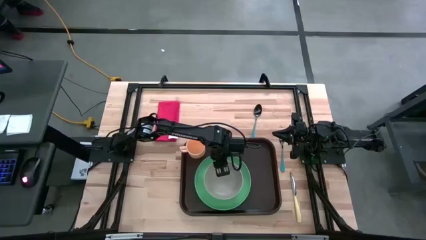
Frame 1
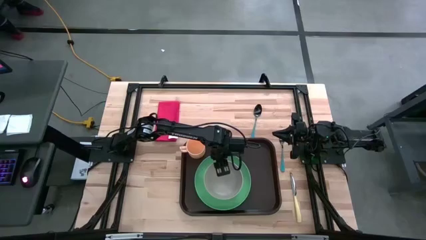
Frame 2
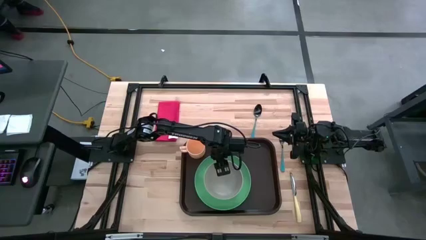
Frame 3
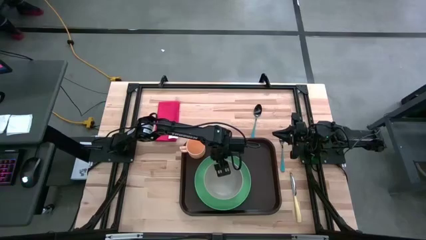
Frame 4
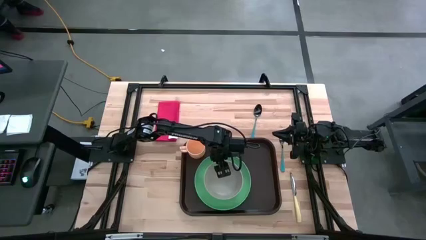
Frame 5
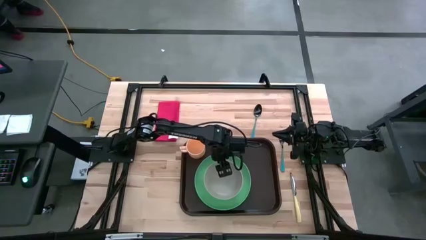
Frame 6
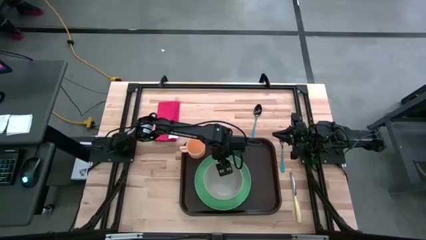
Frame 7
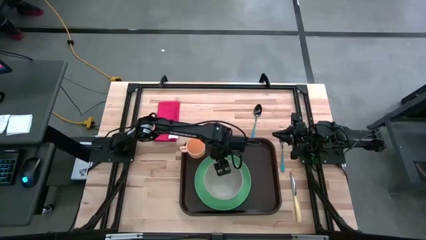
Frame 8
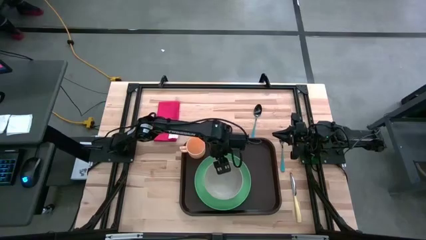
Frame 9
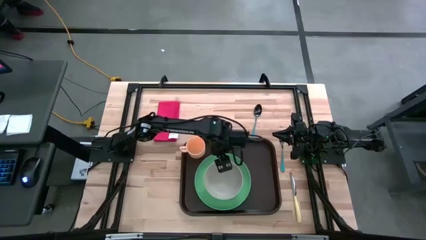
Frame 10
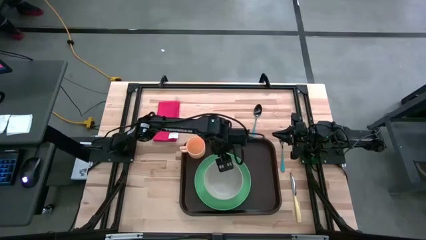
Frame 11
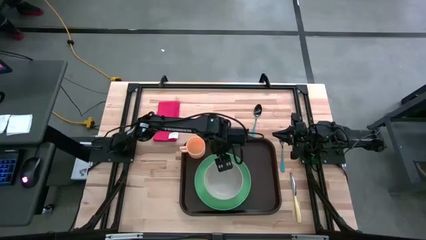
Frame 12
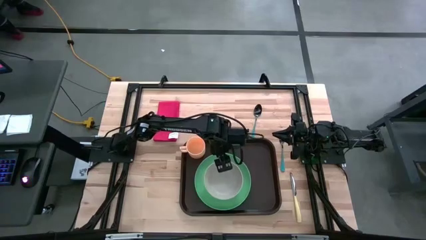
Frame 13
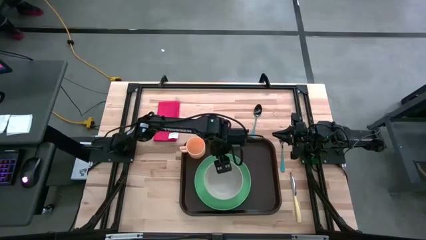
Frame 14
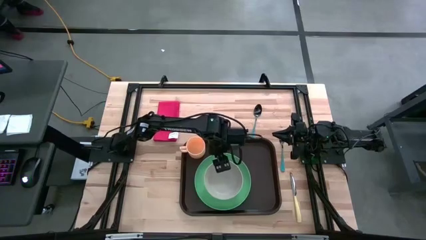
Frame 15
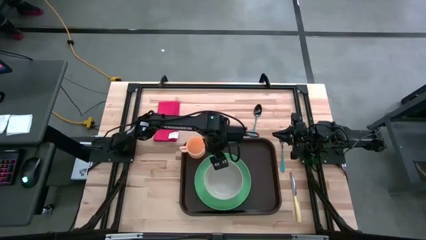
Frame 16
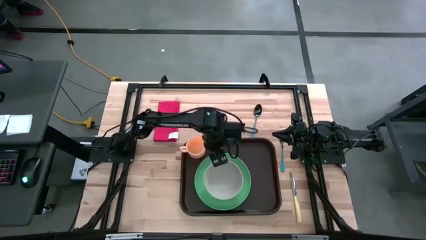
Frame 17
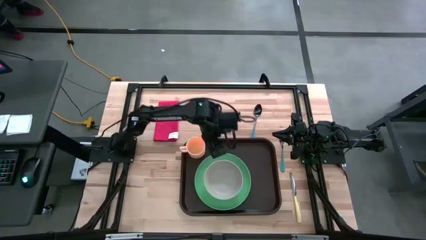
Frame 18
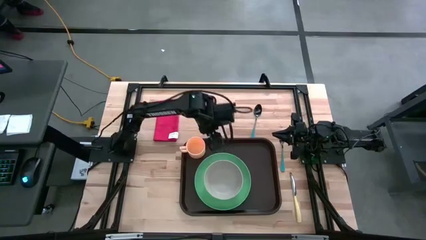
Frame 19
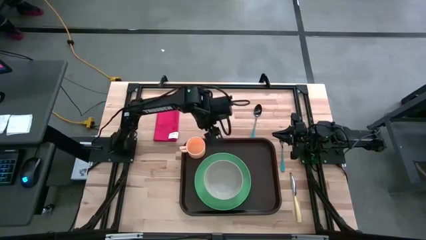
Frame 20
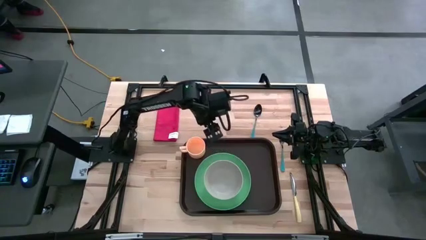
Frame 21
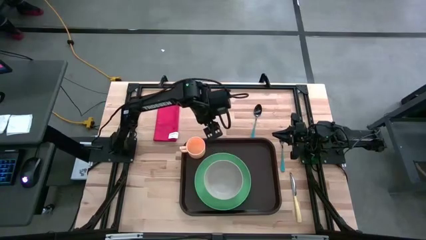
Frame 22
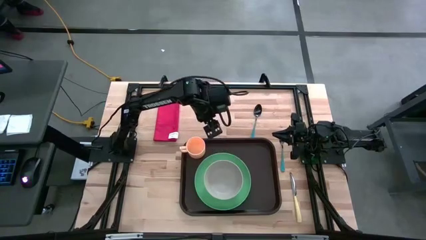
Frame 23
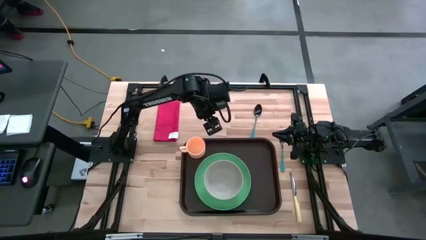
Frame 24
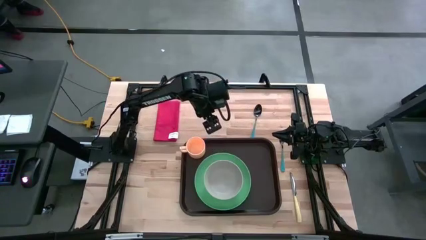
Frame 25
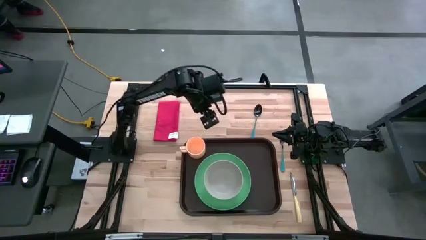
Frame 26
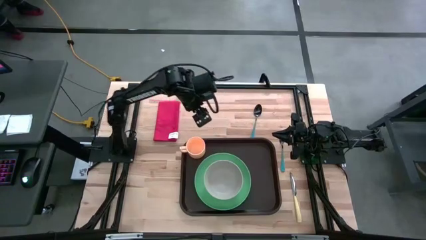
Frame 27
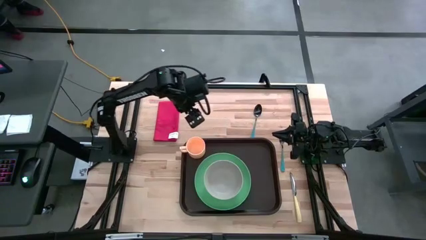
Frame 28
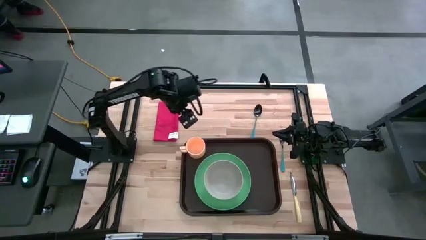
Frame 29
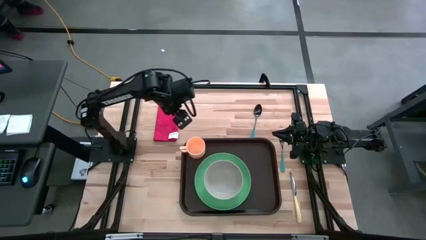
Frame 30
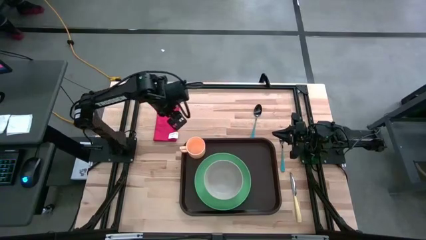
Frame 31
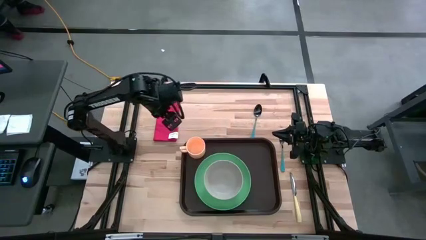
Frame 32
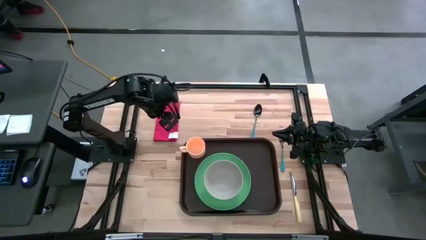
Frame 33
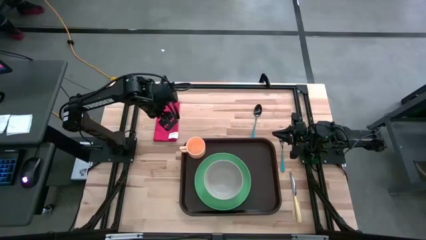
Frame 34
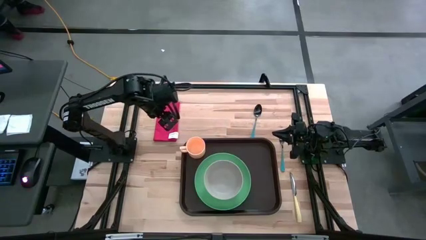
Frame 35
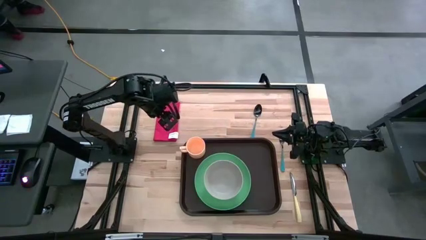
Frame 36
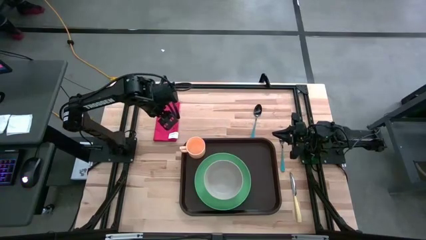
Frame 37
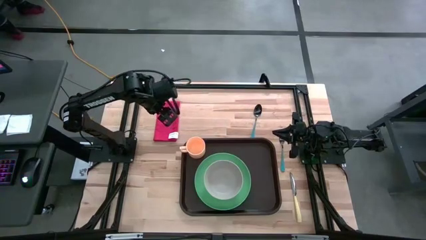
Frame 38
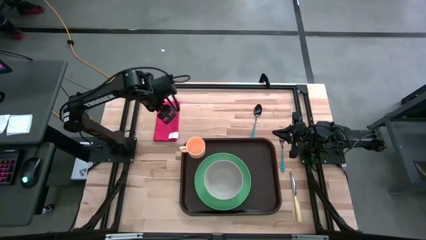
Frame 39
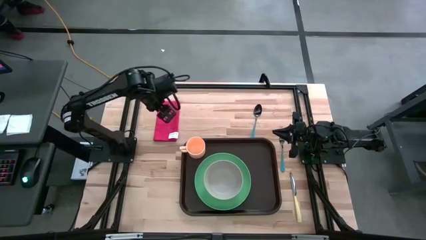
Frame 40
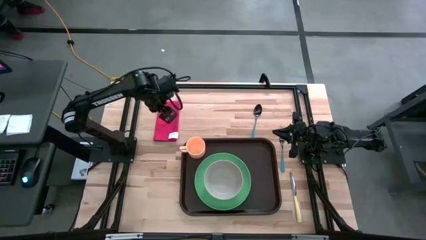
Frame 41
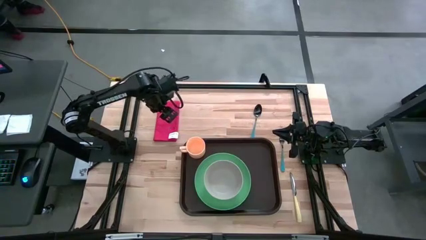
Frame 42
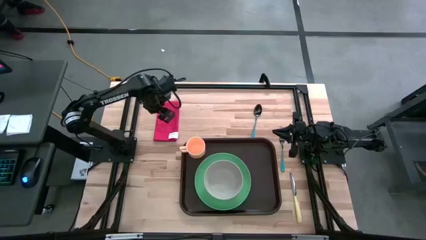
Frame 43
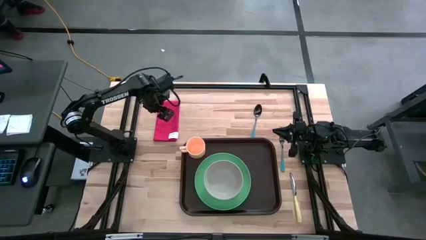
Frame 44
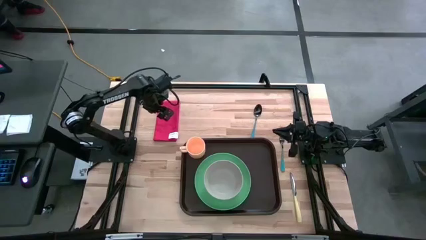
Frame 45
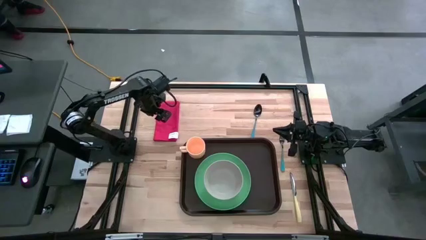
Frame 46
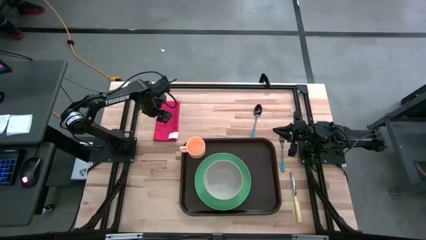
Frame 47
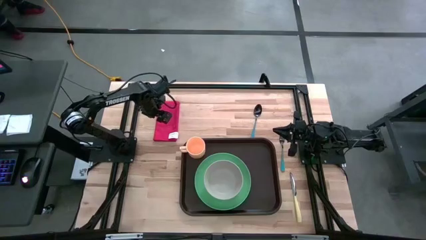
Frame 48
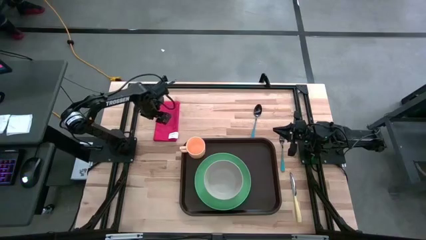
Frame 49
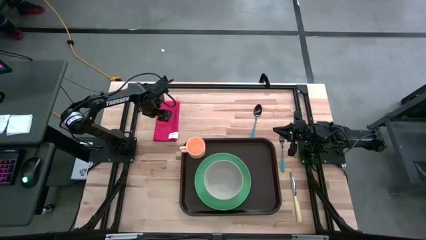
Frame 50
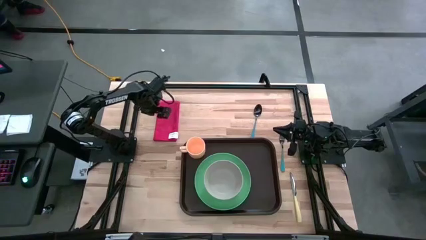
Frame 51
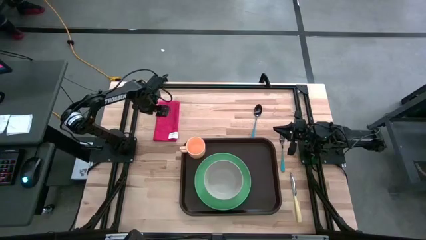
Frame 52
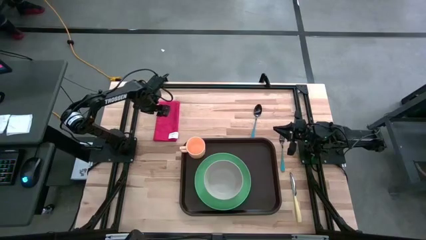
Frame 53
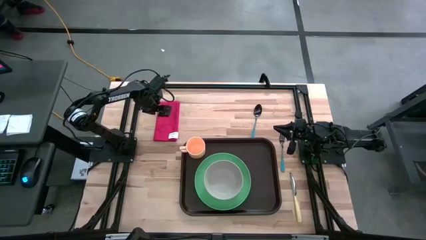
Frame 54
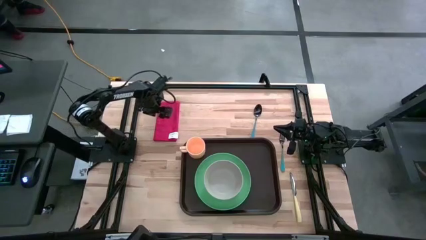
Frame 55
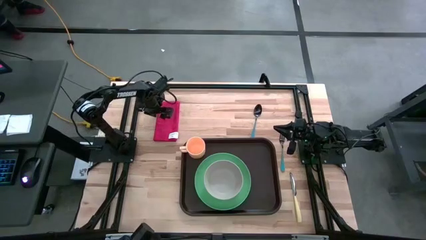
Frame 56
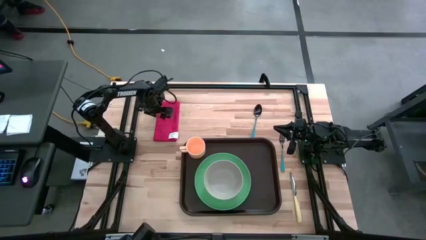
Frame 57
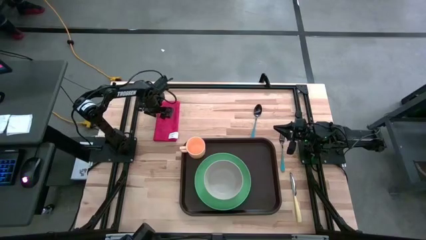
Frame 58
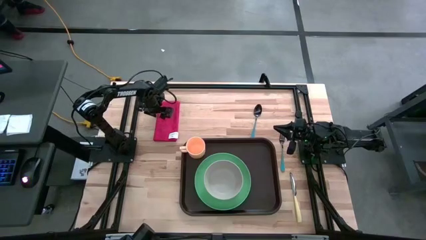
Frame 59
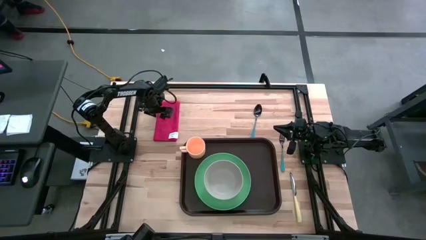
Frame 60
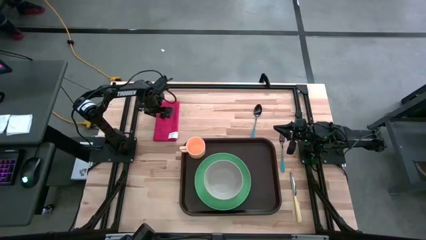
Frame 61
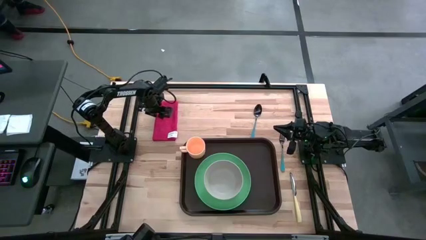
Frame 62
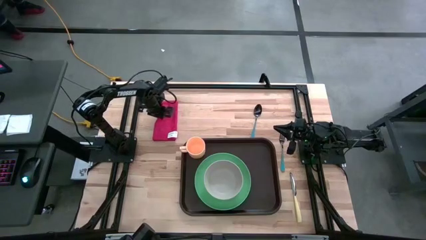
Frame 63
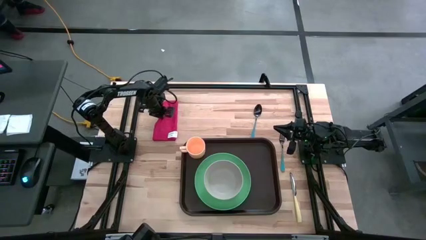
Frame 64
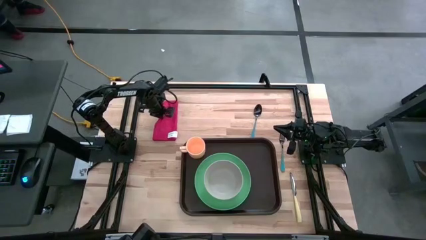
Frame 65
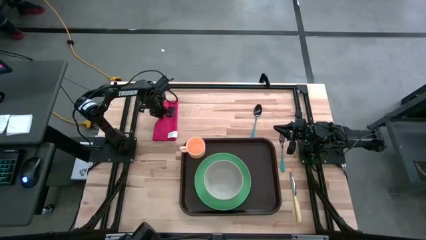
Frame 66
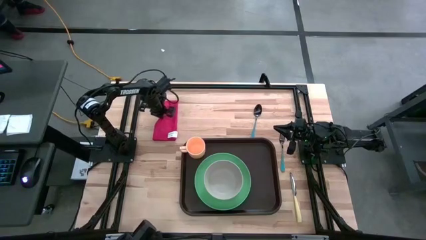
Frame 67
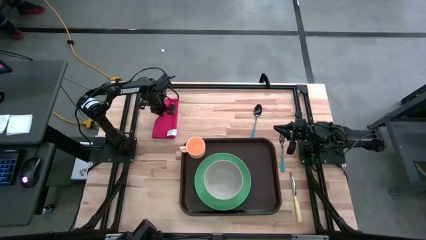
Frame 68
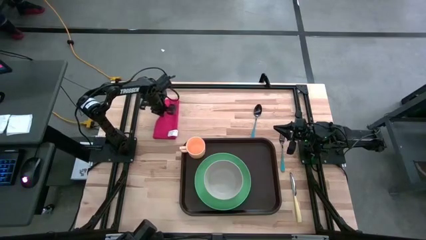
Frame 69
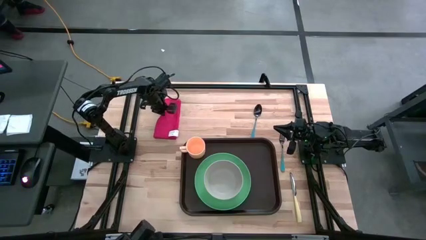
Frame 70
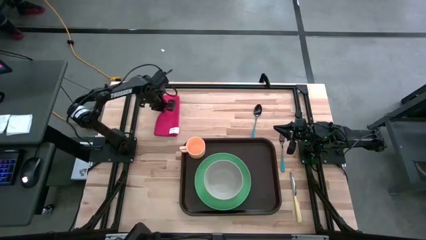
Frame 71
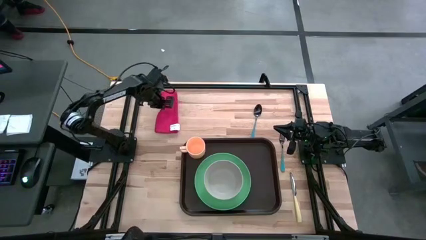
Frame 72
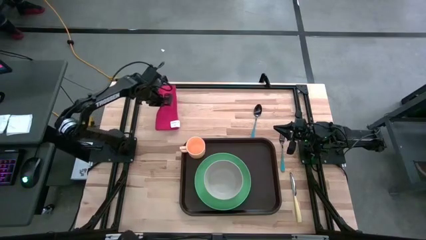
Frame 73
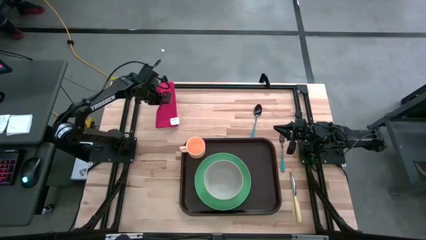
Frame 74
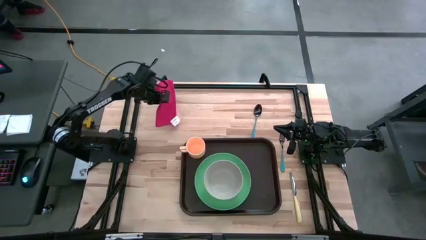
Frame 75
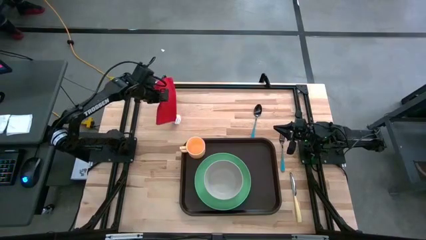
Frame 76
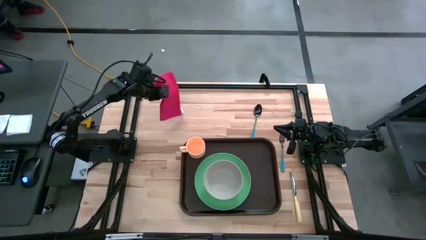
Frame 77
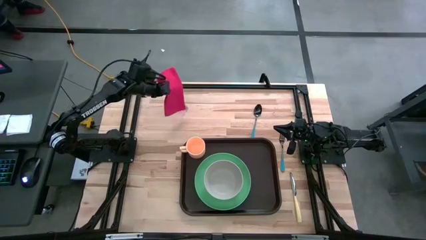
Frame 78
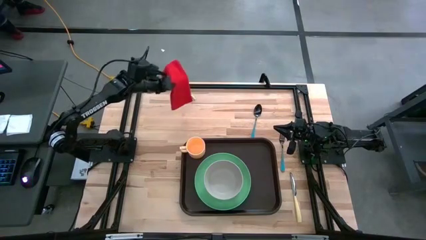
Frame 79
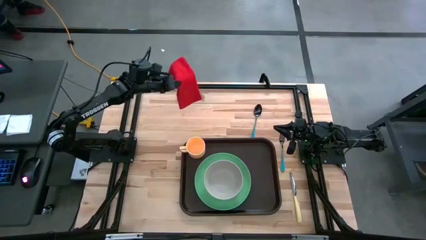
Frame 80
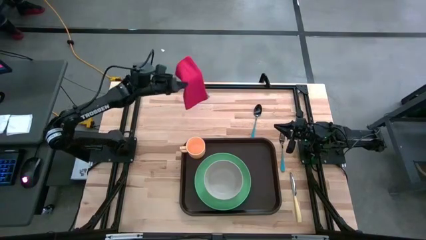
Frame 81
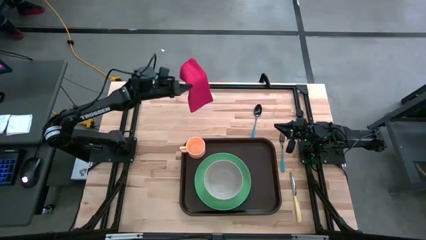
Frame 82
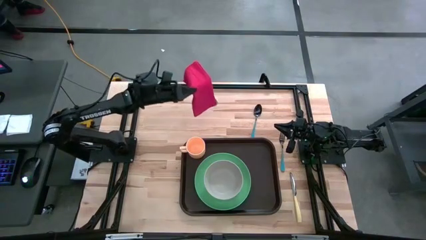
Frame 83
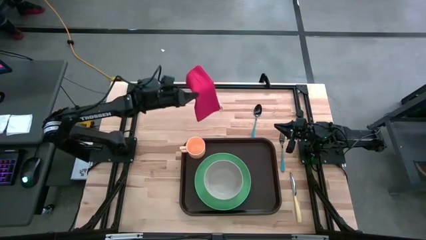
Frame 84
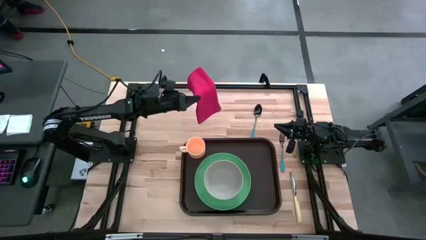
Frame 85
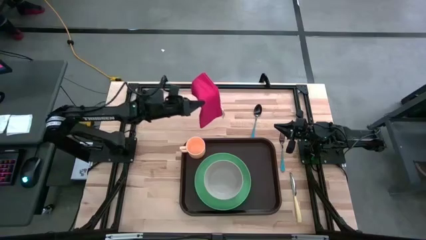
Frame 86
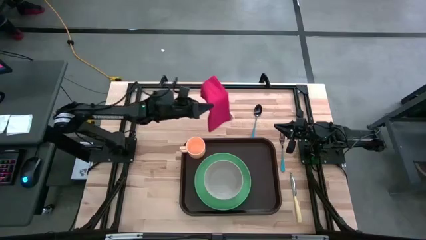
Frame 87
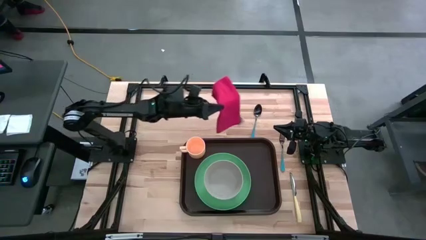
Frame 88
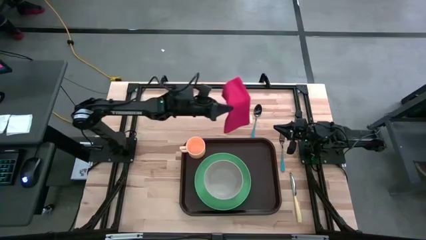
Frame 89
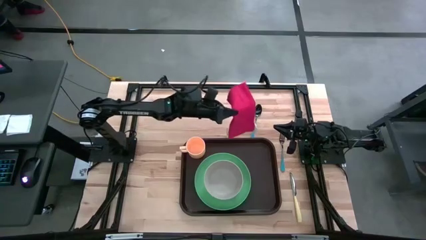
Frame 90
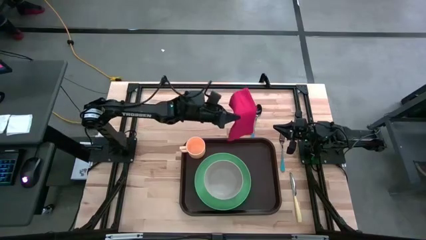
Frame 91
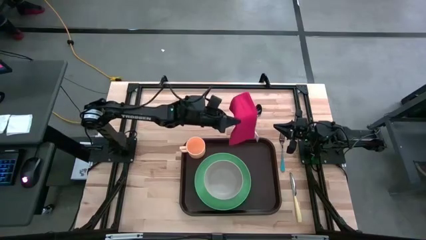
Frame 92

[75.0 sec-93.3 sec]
Task: Set up tray
Put the red table napkin to the right of the green plate on the brown serving tray
